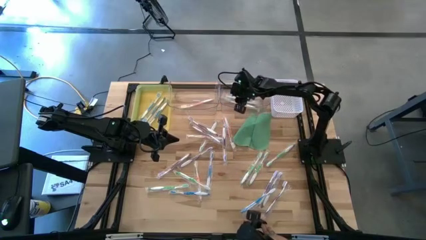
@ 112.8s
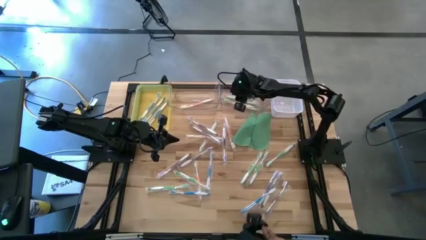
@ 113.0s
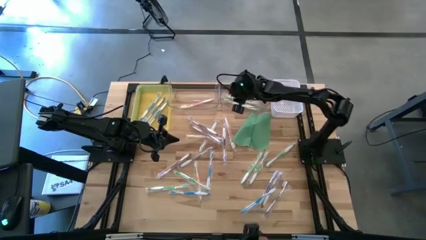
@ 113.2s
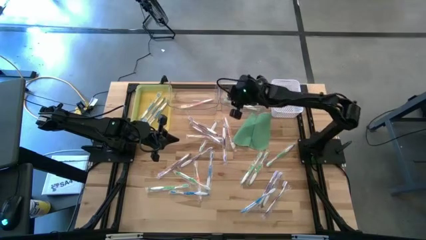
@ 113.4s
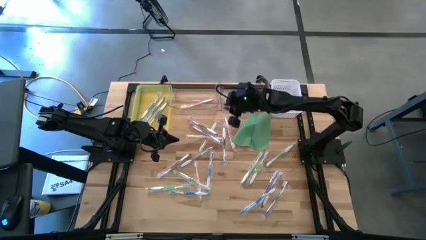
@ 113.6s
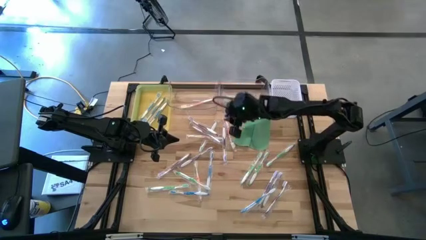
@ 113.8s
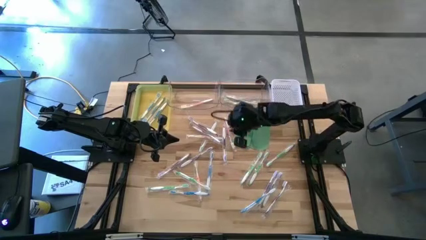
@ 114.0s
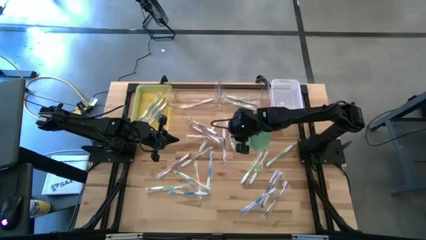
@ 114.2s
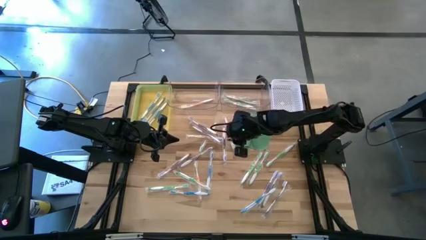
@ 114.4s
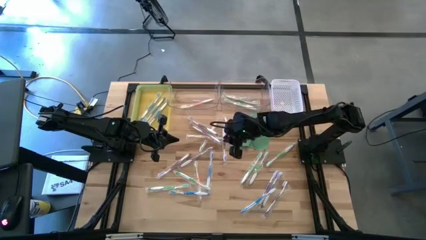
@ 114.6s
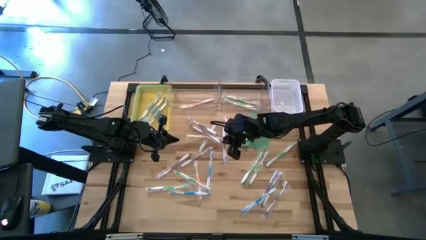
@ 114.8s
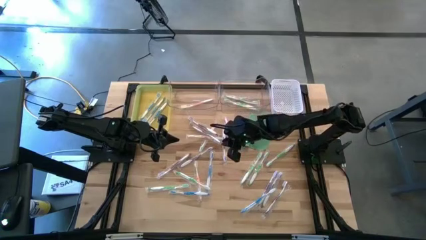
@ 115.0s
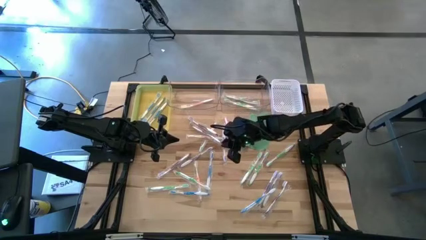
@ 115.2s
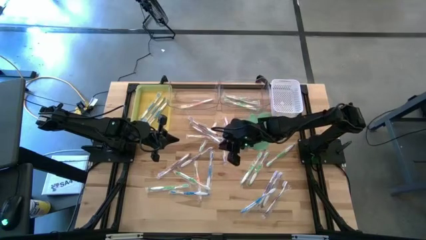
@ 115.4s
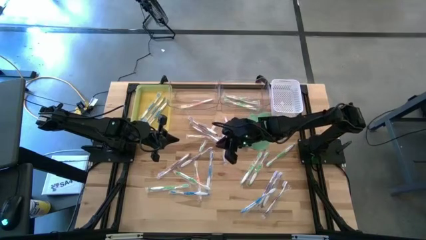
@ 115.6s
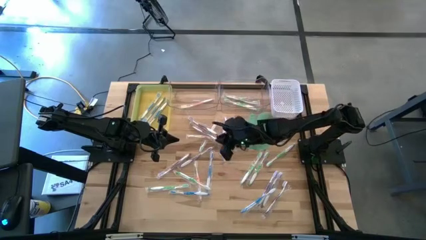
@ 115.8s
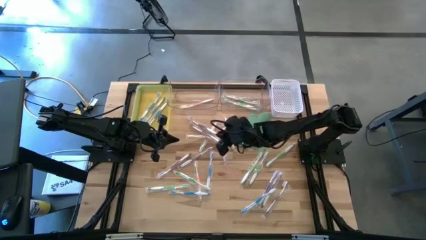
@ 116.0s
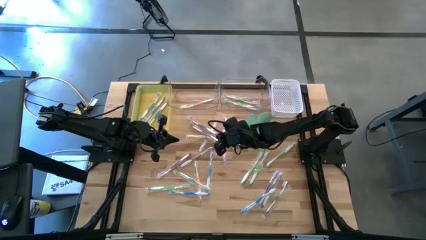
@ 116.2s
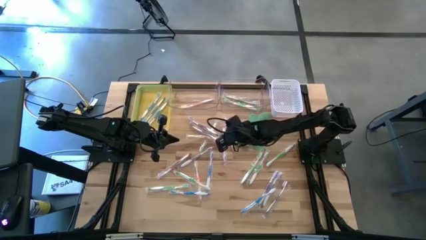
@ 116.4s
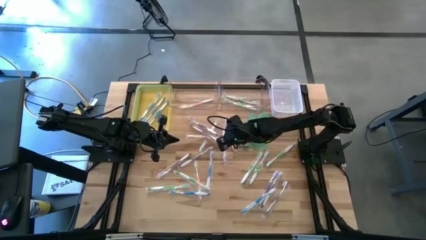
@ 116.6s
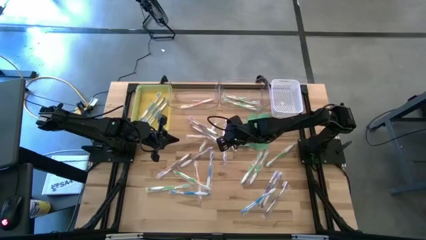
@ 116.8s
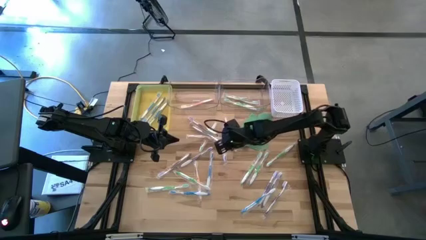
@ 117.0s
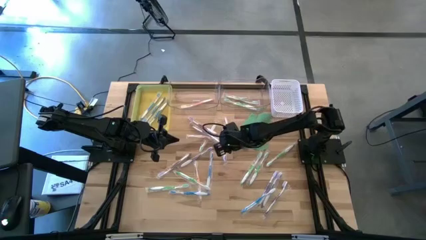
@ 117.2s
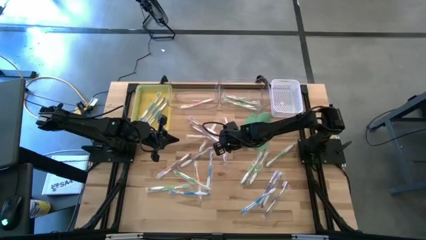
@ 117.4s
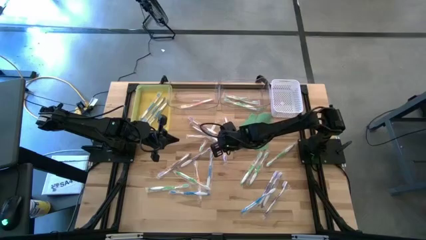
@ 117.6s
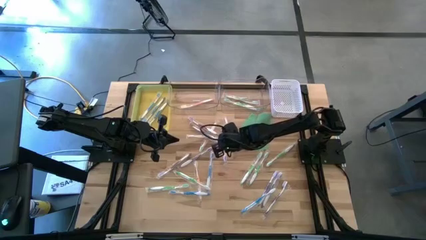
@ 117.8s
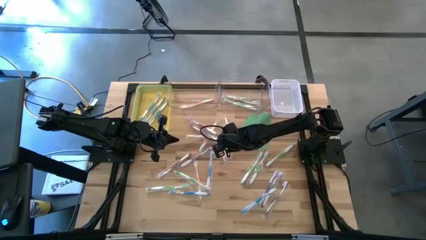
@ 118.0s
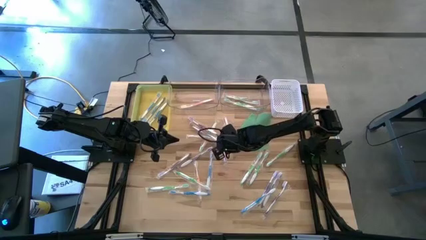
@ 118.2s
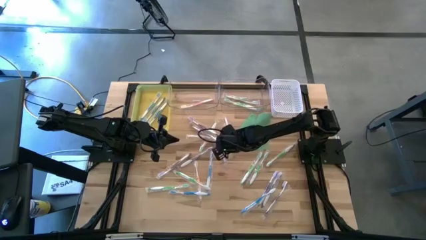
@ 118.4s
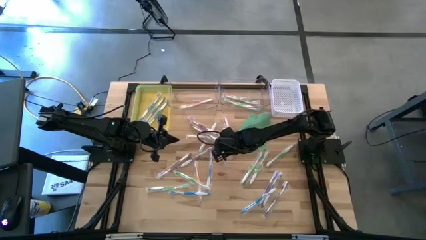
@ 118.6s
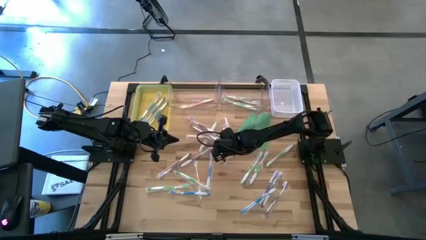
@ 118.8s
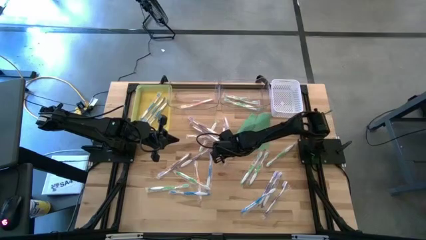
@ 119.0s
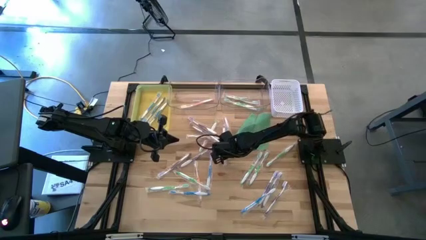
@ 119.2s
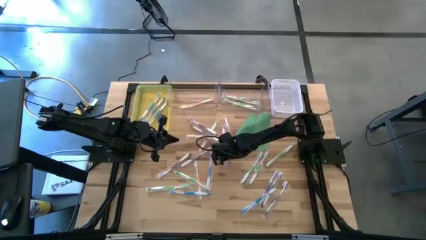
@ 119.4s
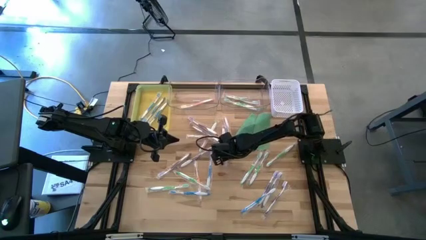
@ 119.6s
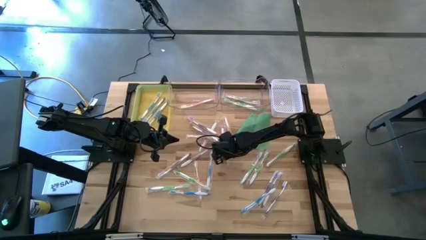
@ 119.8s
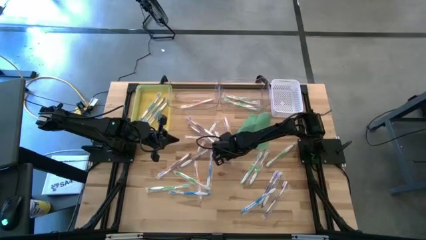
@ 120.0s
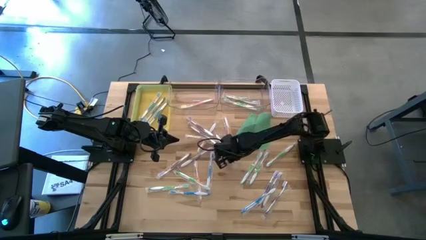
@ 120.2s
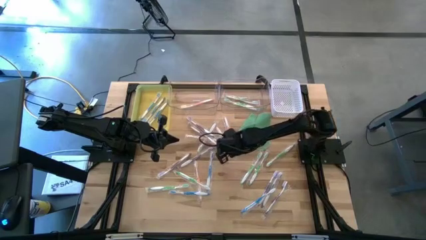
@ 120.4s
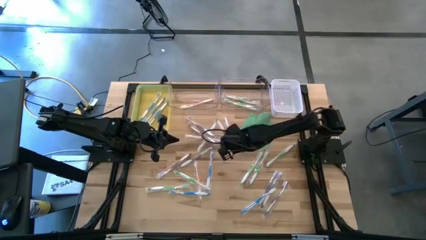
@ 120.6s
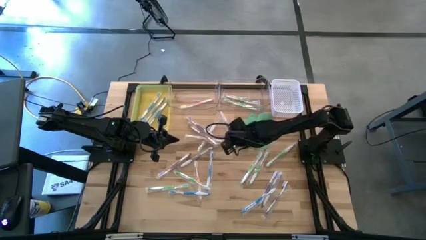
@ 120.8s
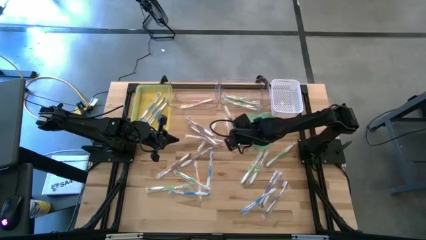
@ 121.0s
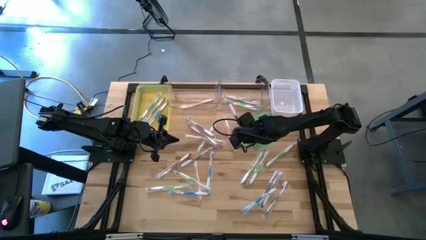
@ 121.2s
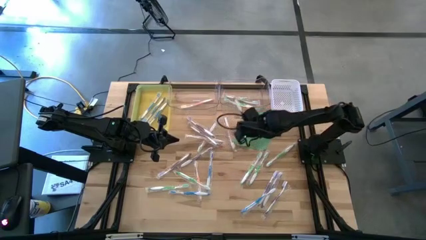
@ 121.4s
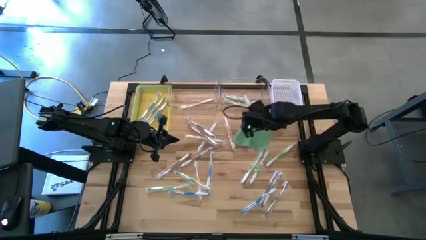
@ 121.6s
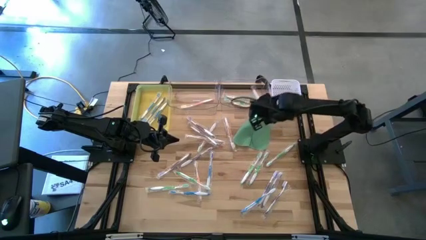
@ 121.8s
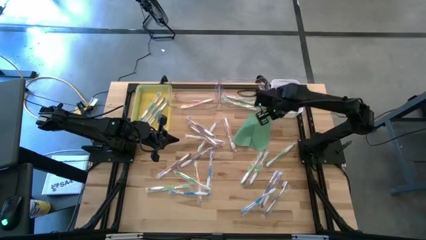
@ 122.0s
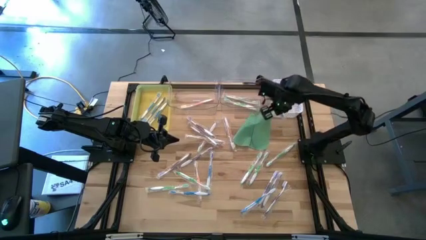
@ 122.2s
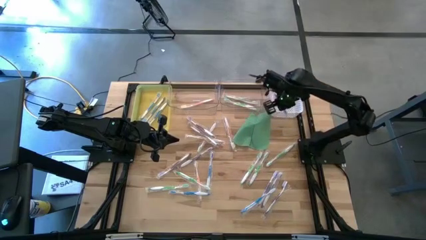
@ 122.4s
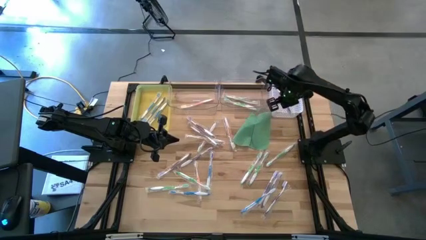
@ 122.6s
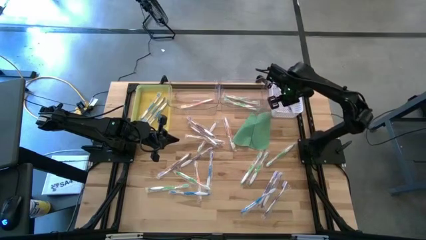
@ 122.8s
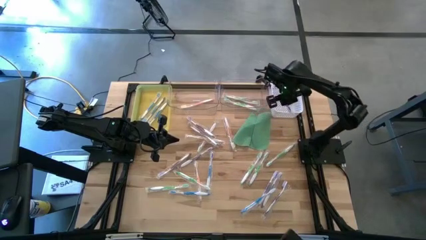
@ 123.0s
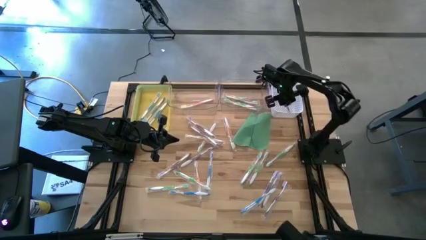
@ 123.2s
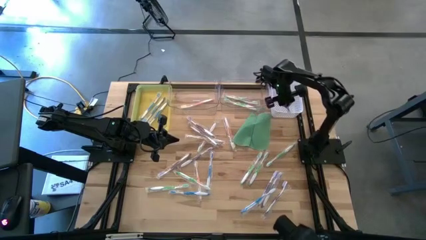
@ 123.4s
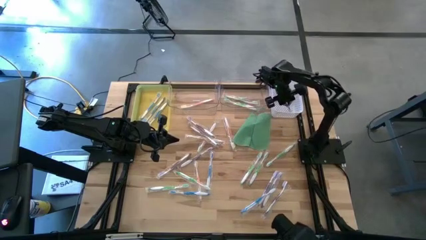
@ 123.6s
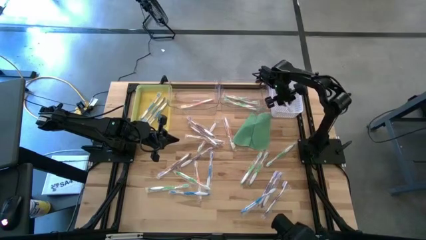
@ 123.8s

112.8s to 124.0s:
Task: Pick & Place Toothbrushes
Put the purple toothbrush into the white bin
